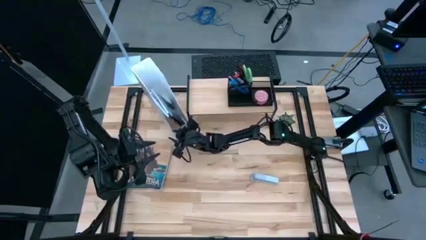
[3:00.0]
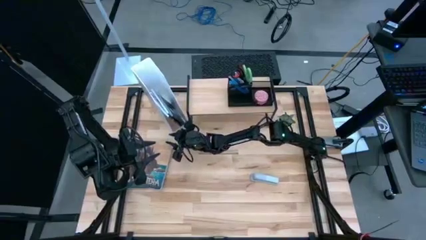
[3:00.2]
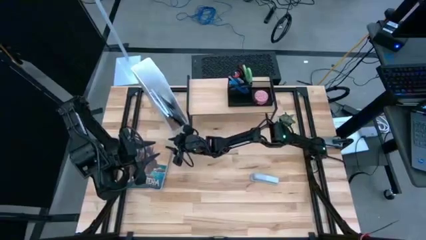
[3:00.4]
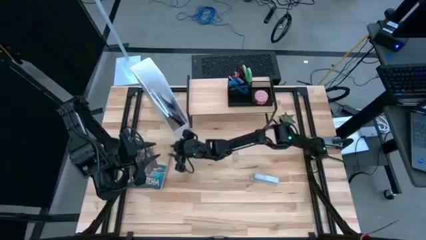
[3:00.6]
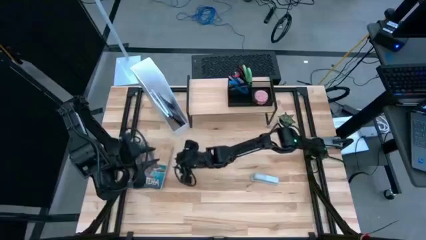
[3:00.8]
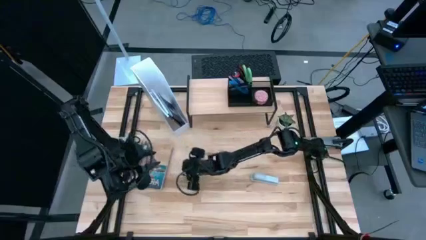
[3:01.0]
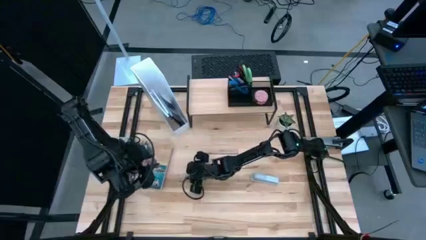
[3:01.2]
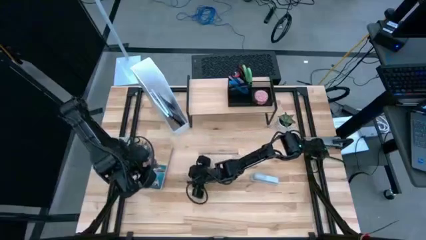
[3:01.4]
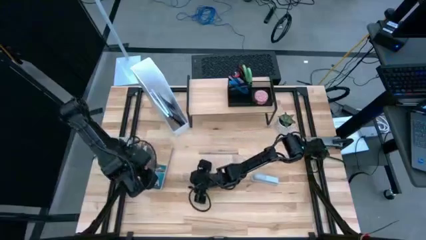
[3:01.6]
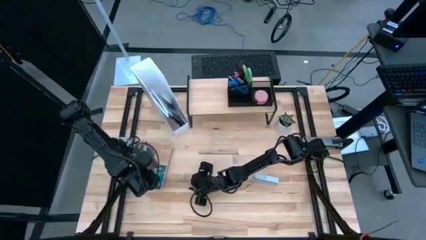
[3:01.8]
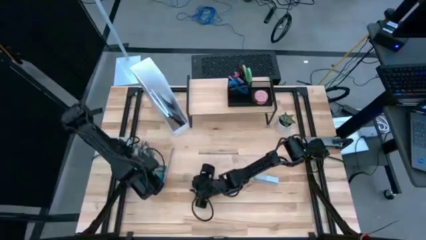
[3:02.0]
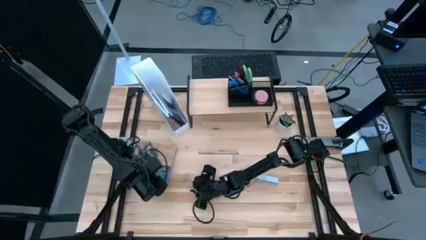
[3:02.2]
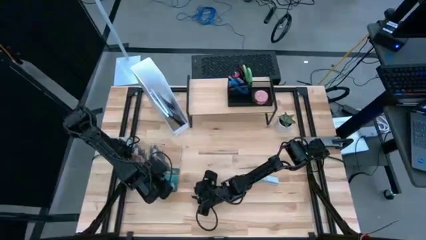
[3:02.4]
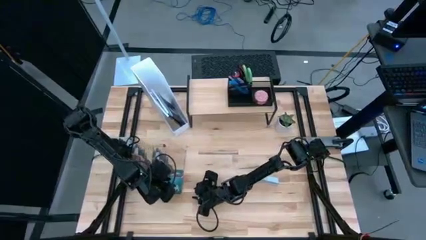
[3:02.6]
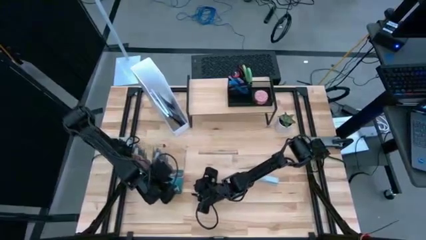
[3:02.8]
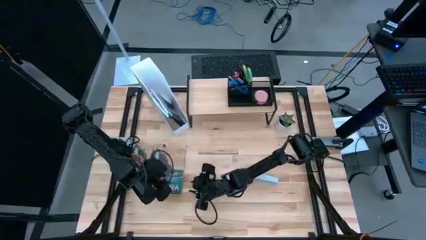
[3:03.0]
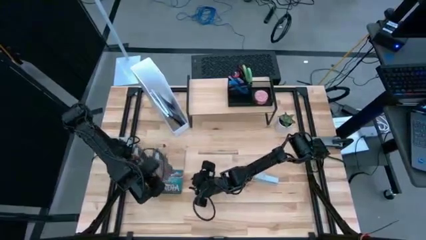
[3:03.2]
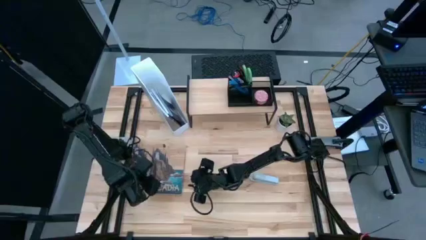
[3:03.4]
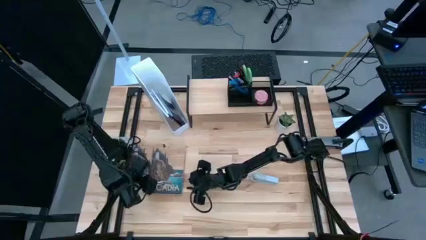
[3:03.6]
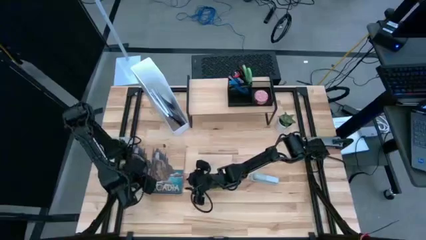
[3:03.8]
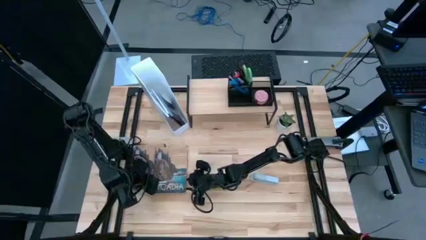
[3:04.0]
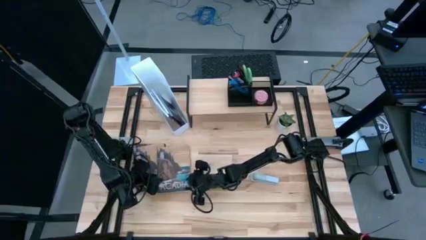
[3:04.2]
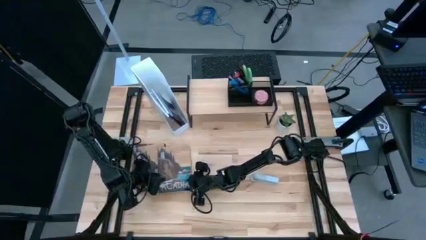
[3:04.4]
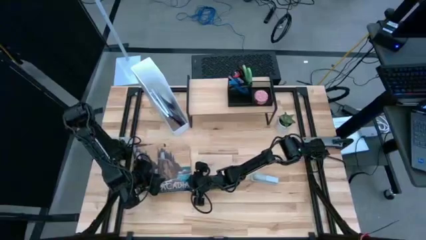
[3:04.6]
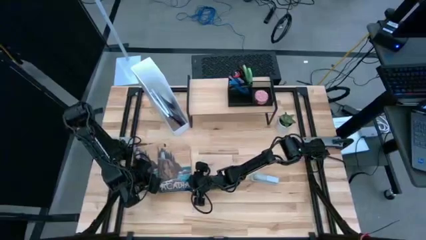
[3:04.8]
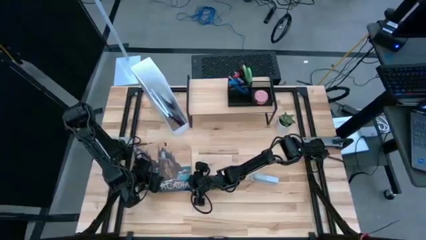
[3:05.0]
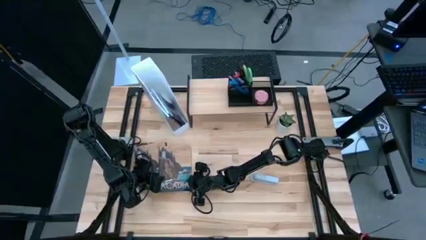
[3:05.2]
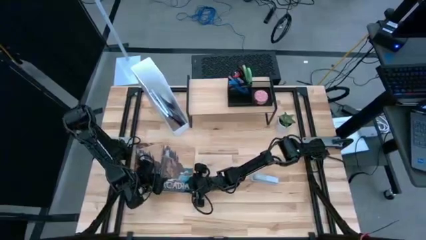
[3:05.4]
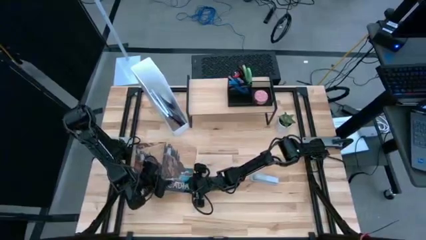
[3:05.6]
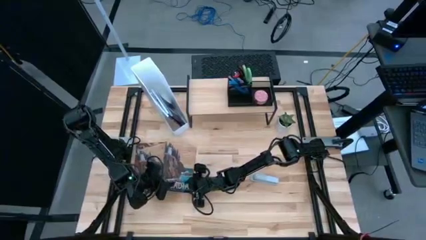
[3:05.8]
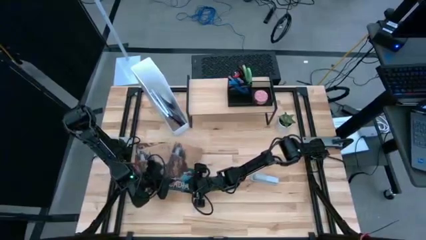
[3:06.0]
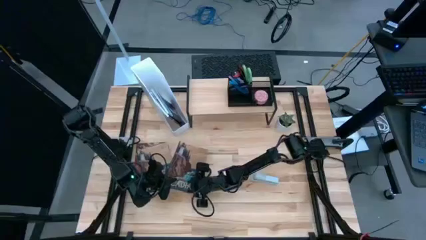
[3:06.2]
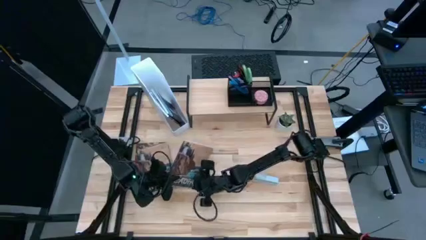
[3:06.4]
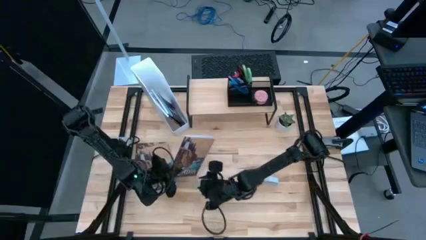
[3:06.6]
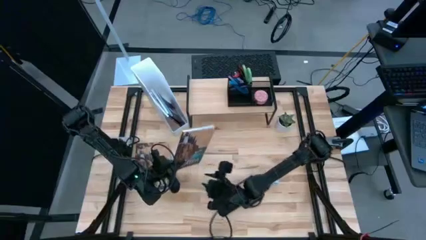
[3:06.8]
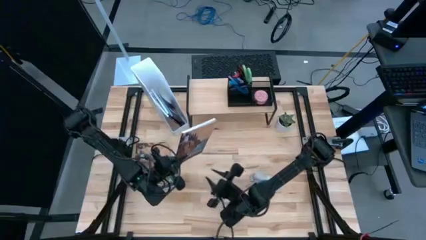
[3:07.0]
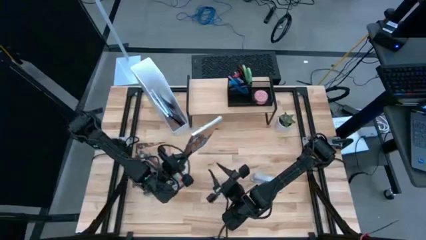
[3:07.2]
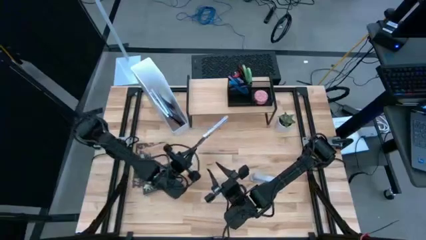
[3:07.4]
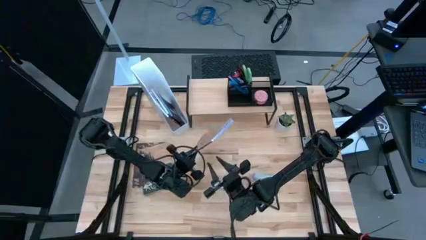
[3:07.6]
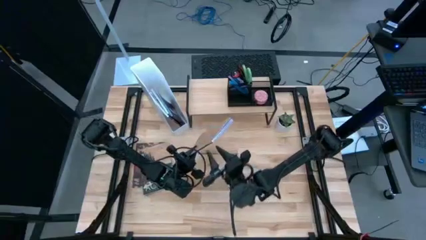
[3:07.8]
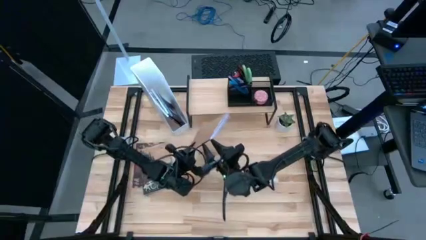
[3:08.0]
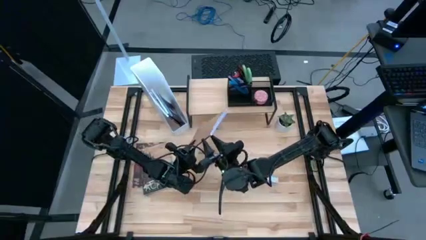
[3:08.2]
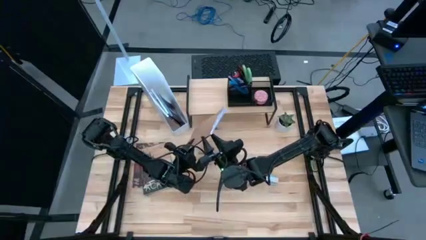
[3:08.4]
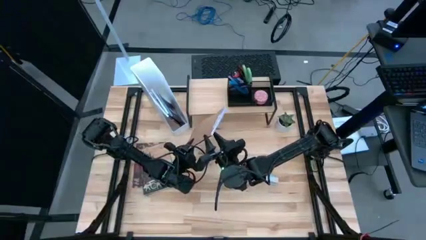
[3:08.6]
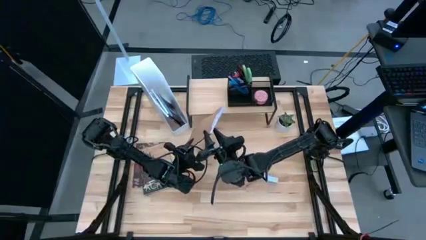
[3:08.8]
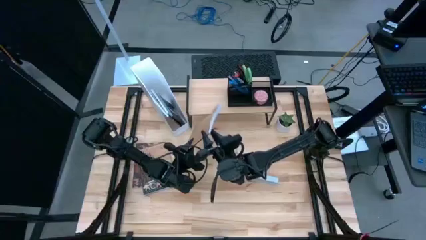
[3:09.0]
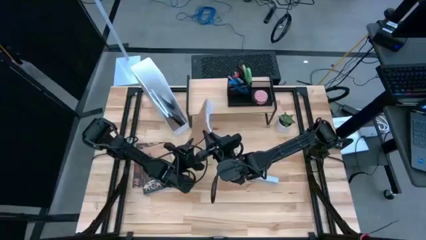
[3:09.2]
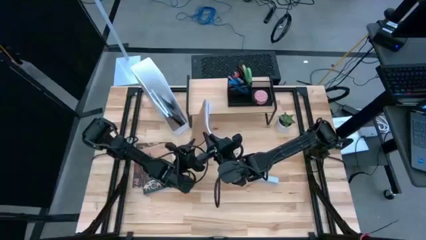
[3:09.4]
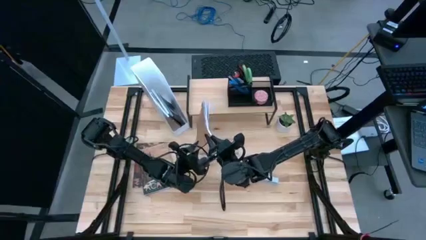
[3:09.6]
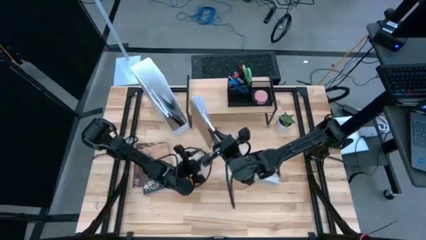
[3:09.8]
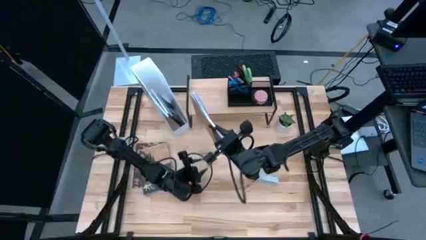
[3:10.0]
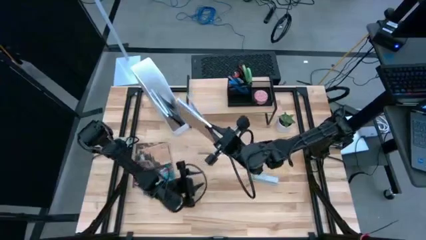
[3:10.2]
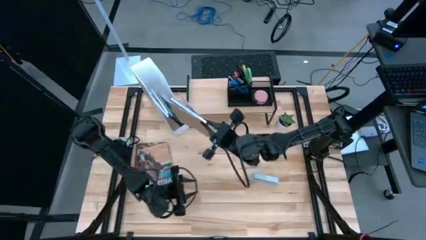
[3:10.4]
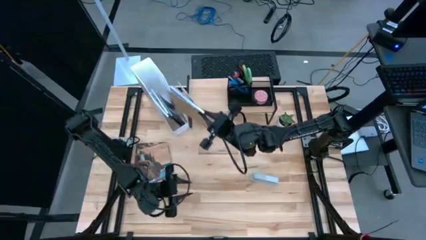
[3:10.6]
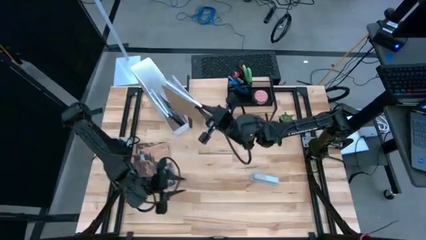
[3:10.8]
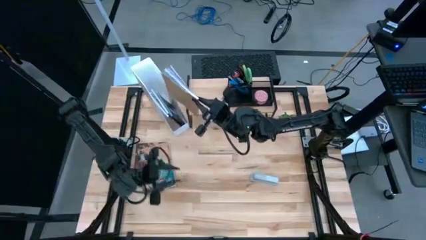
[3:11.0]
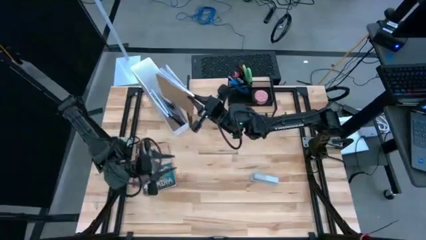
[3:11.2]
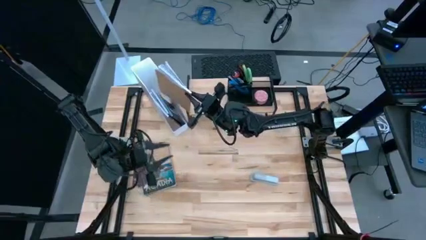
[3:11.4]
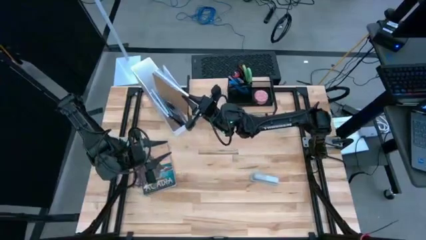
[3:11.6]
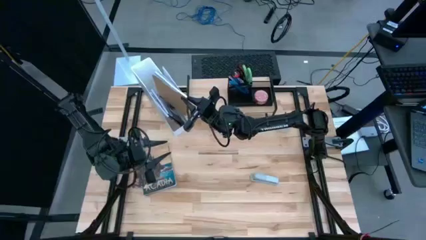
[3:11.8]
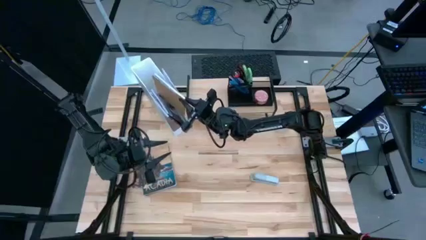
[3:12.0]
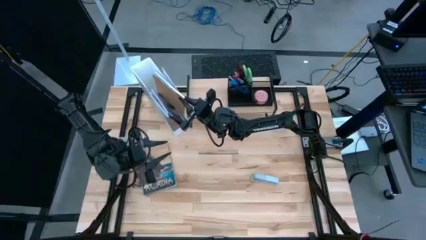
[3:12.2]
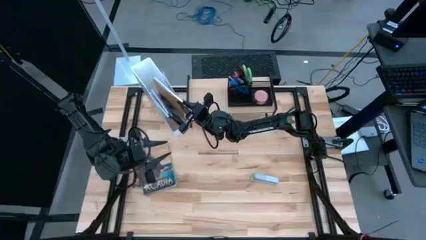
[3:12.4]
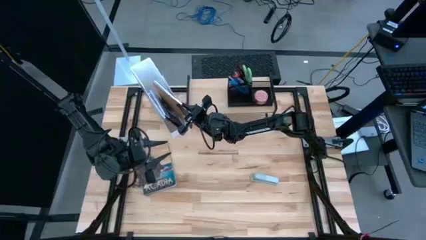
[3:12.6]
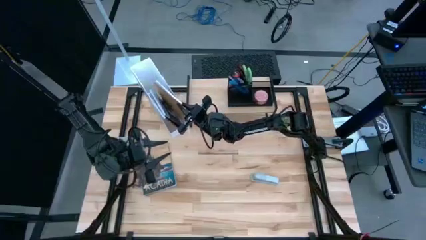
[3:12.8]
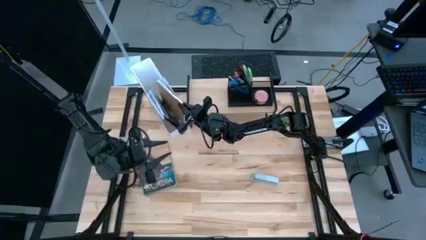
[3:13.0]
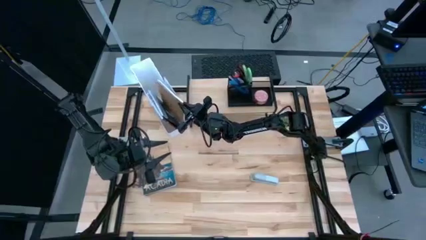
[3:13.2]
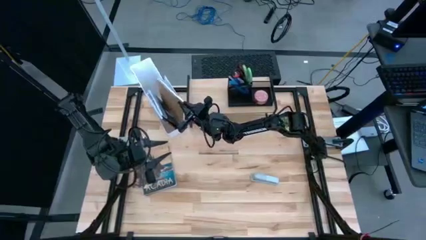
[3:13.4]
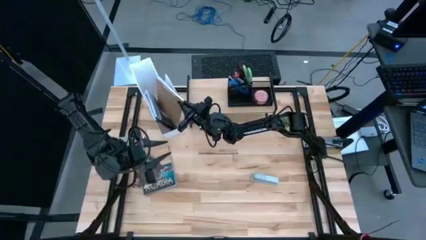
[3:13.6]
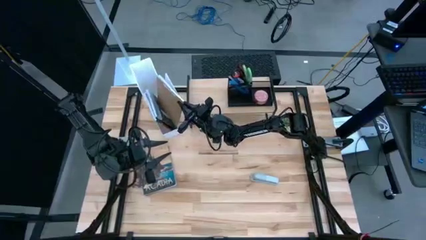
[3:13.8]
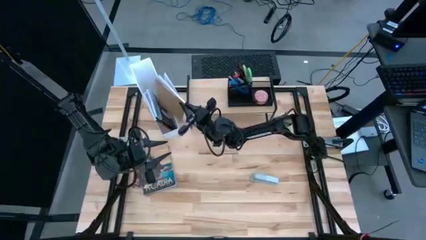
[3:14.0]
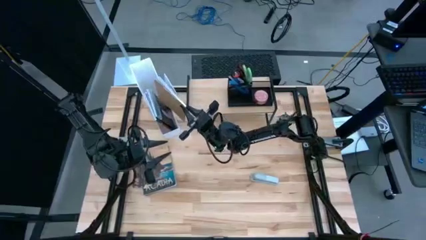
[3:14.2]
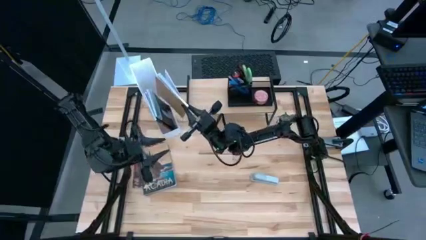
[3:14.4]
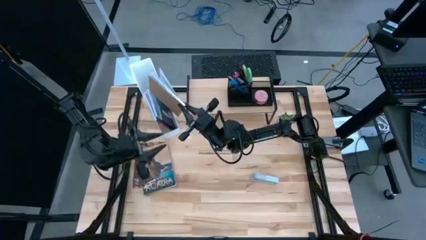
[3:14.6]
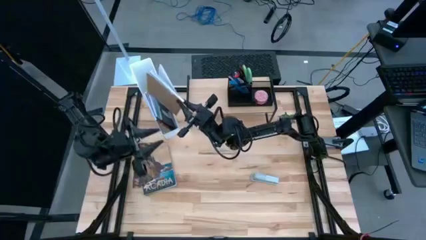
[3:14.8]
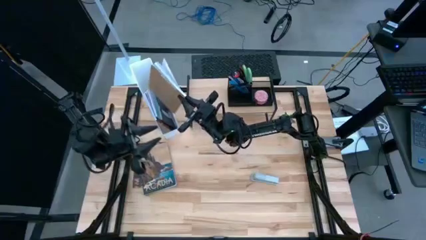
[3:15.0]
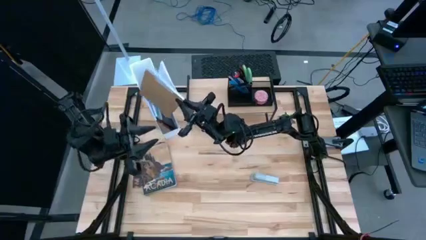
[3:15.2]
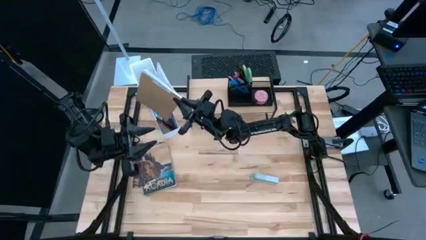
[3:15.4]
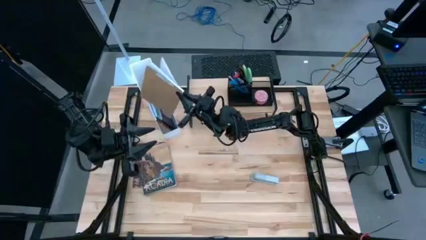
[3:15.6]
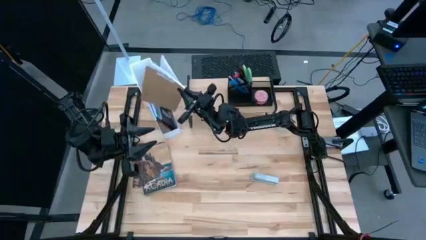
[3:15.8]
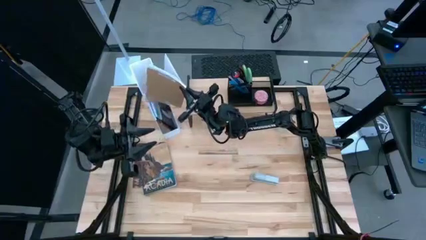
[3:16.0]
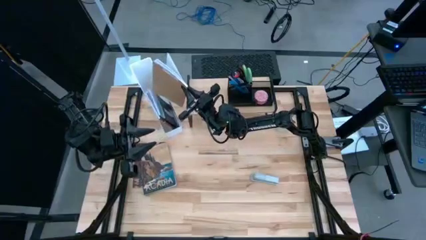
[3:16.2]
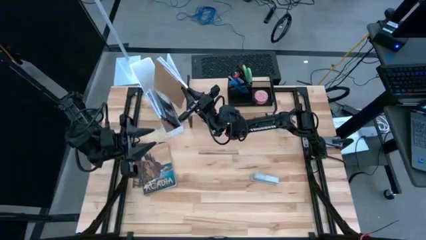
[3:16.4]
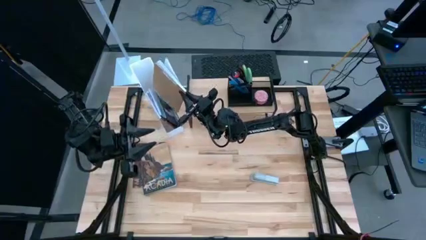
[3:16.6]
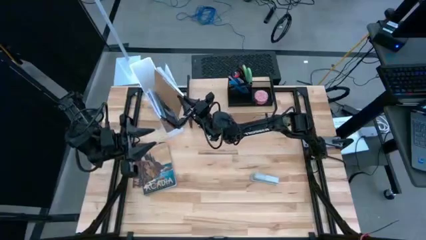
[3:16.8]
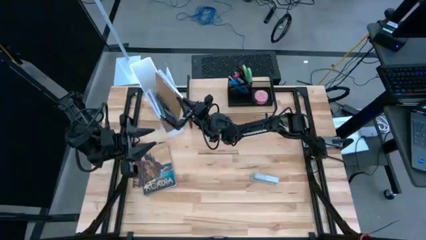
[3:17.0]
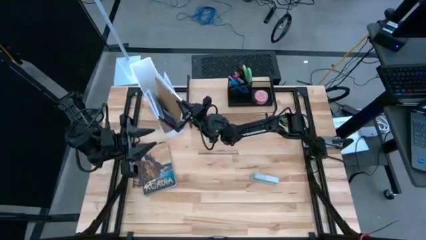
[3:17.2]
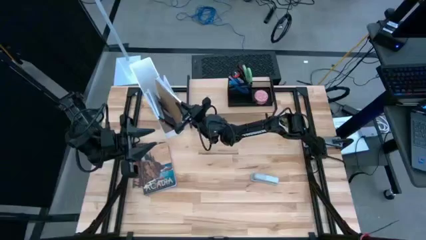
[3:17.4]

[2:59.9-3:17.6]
Task: Stock shelves
Put the brown book into the white bookshelf
